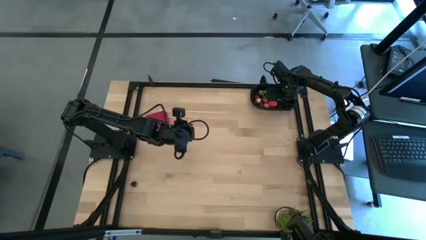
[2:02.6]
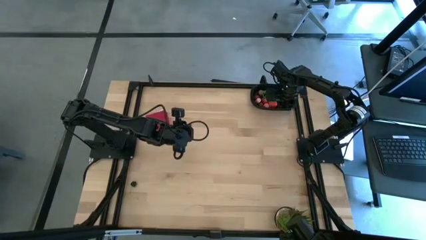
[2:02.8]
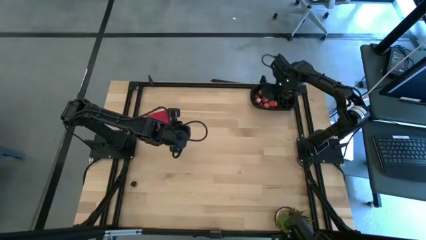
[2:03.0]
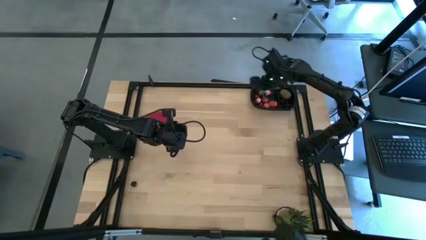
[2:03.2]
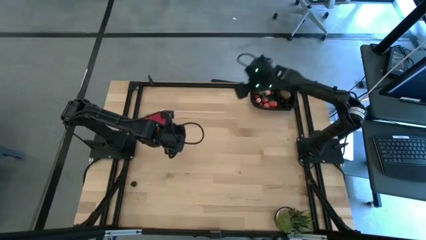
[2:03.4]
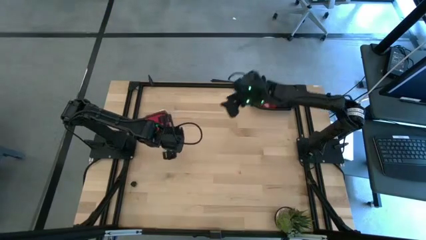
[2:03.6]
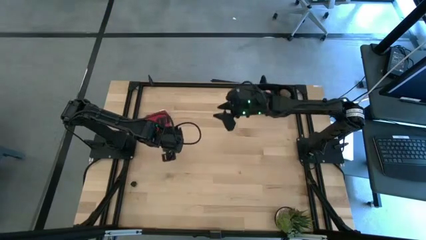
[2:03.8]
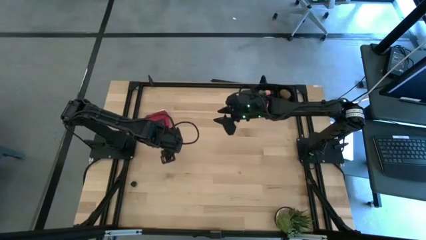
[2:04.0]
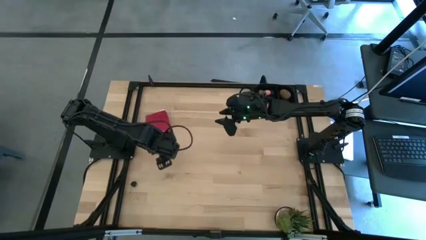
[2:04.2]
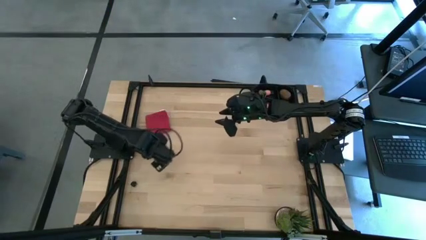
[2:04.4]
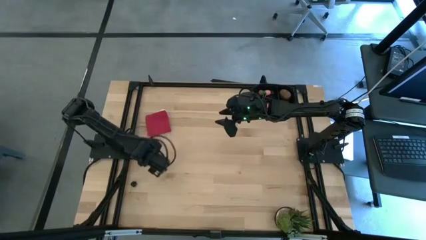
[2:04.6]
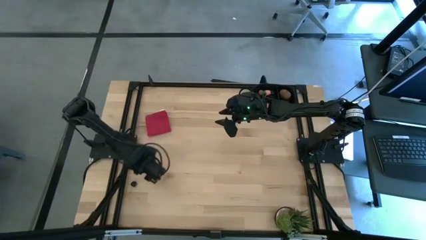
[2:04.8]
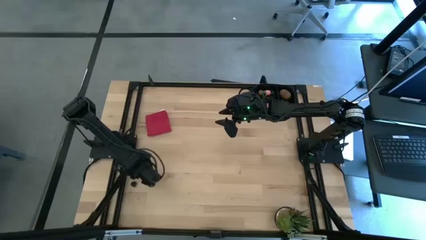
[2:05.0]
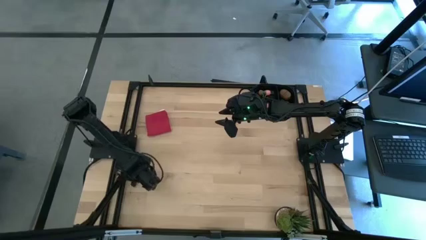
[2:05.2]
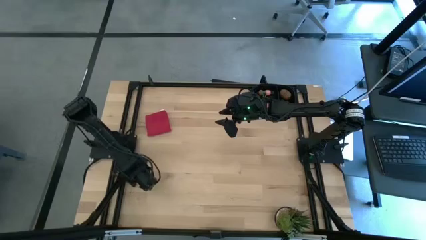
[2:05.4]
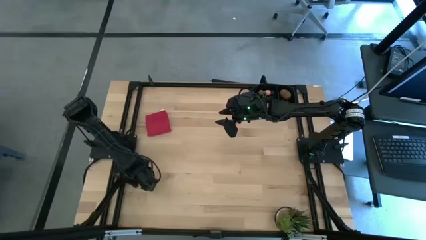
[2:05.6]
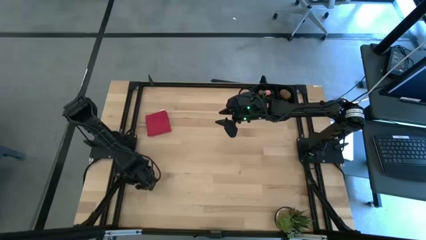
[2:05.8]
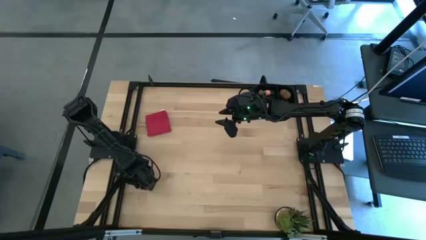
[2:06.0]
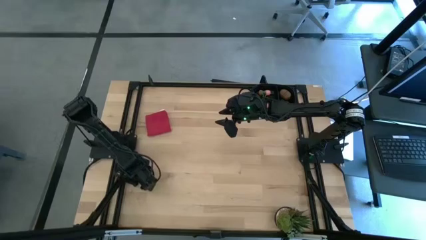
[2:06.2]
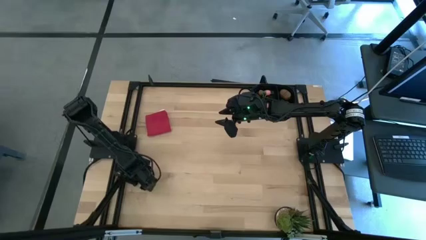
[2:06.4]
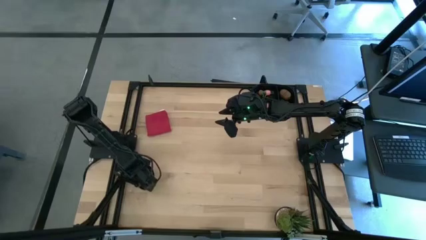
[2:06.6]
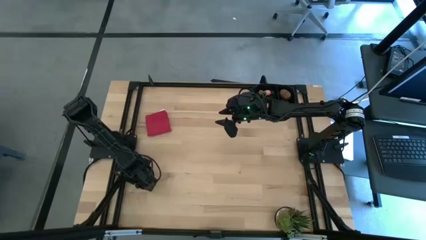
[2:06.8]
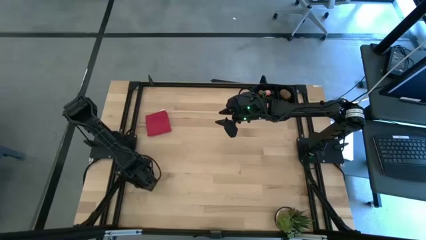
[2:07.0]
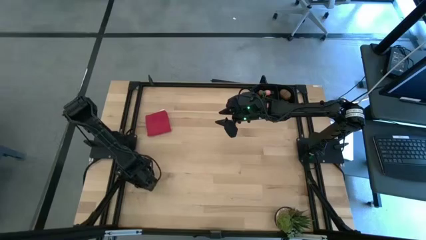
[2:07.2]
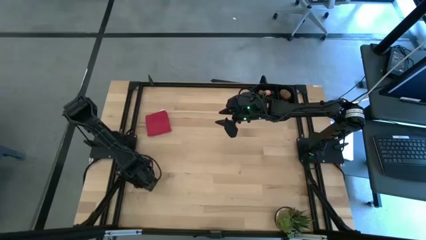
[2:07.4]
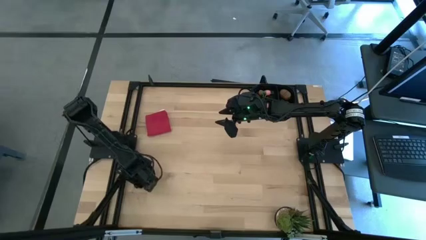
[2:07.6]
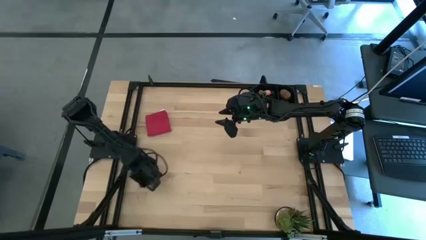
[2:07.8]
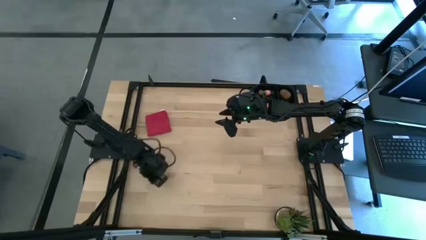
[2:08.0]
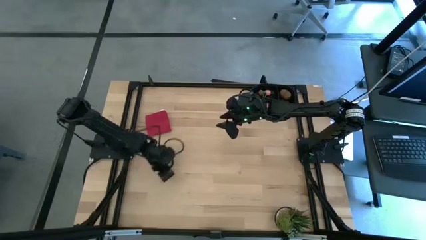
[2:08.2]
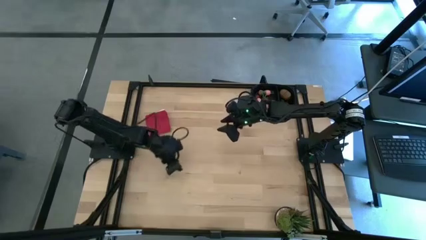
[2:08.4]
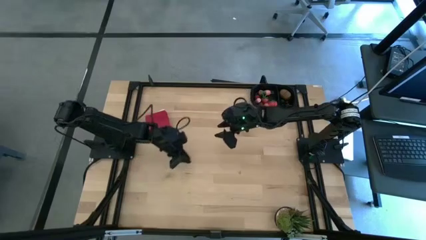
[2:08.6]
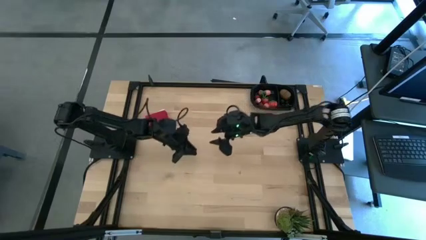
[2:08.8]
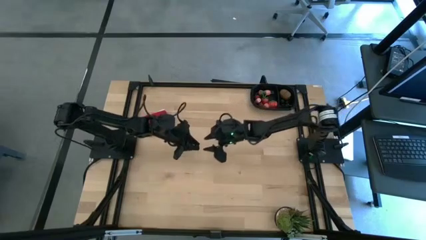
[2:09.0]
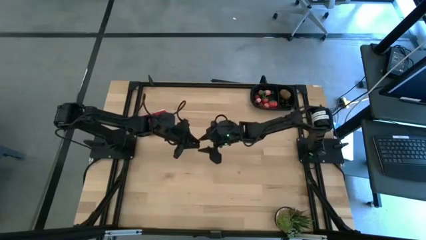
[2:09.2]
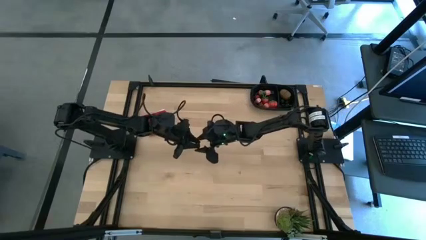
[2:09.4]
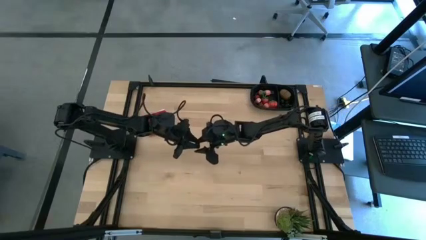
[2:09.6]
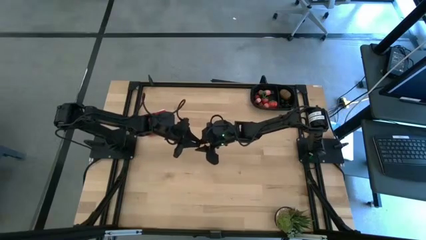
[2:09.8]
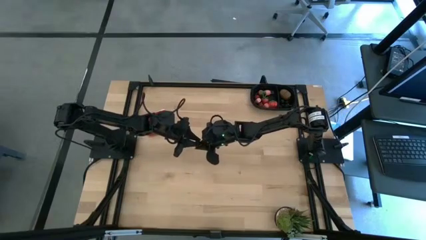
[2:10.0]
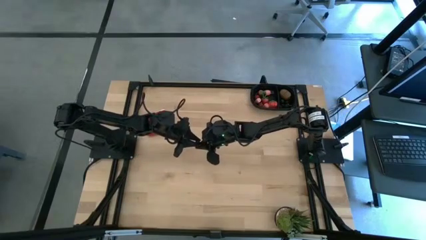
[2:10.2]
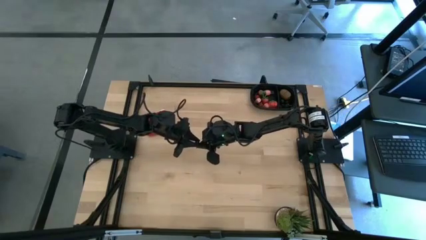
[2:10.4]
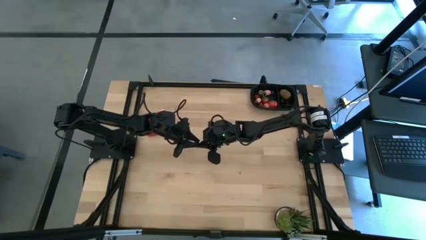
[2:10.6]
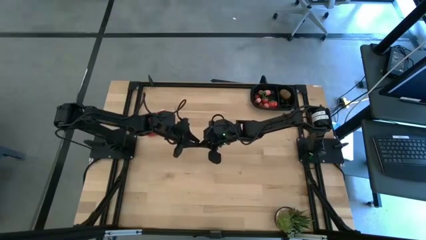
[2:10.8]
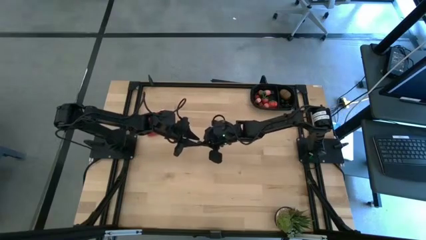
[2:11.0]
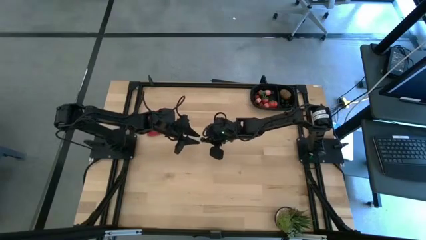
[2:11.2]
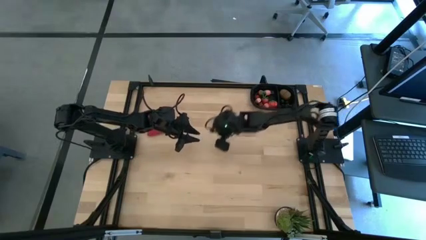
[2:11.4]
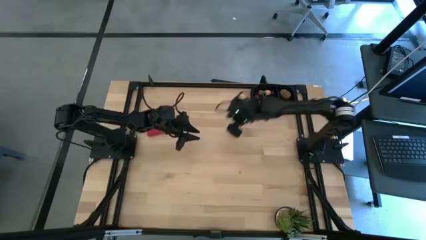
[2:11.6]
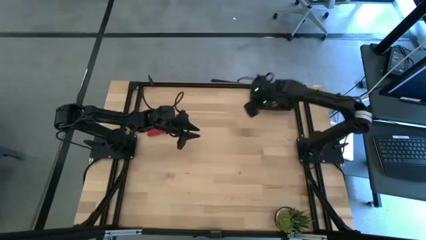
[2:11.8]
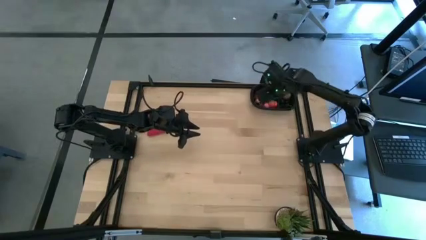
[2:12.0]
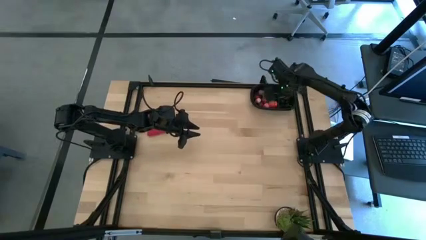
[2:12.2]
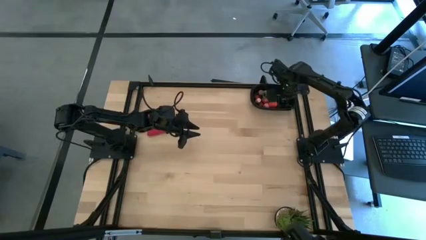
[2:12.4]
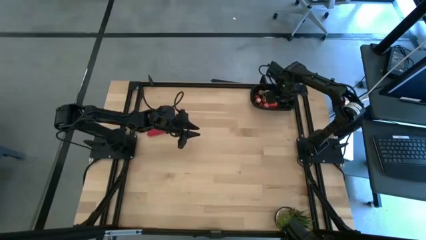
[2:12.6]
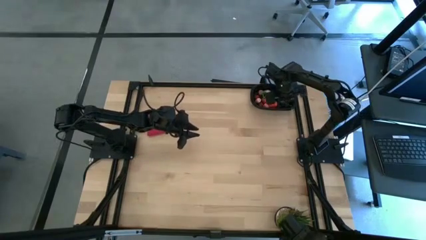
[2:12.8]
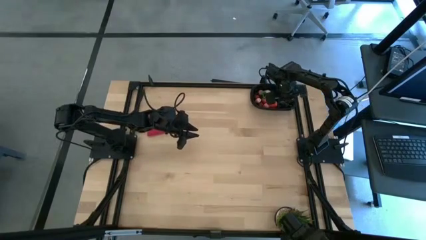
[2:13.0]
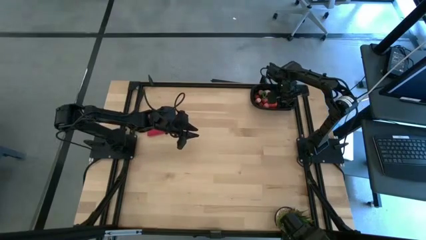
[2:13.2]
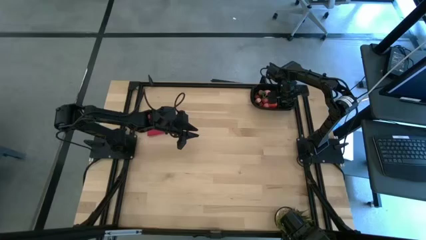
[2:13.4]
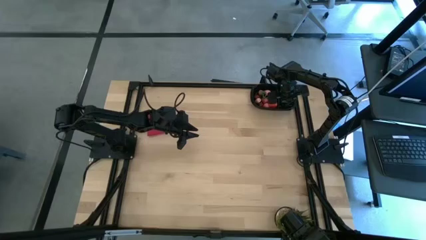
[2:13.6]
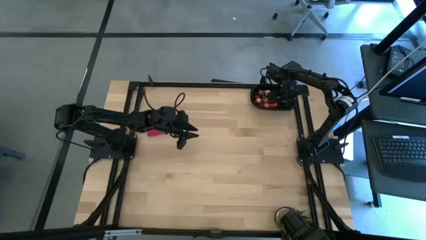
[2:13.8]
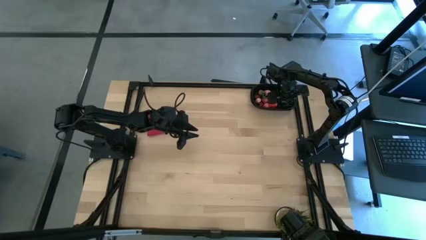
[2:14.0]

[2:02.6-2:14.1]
Task: Pick and placing Produce into tupperware
Put the black cherry into the black bin

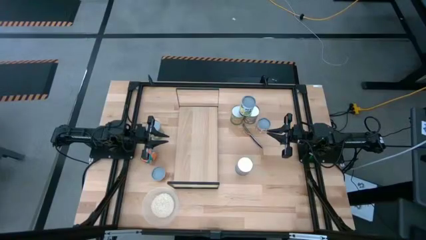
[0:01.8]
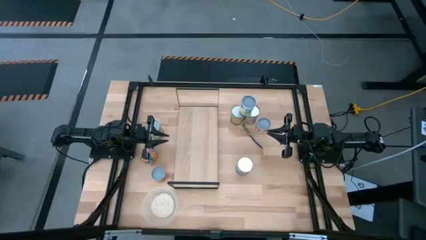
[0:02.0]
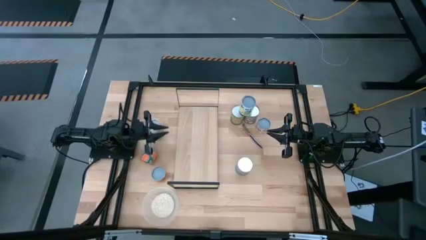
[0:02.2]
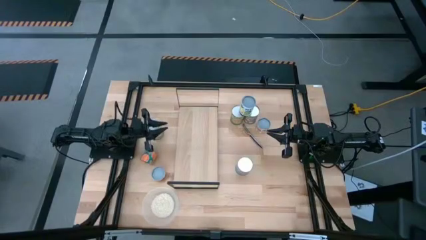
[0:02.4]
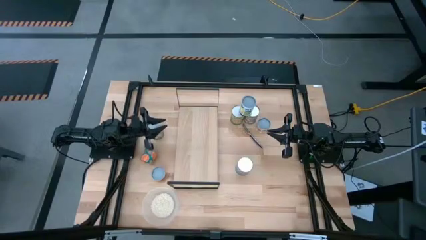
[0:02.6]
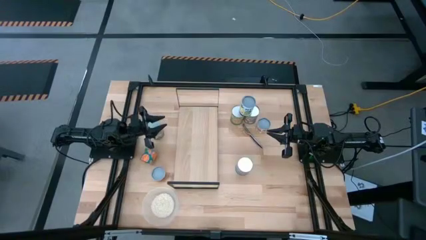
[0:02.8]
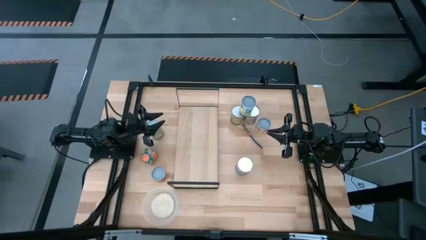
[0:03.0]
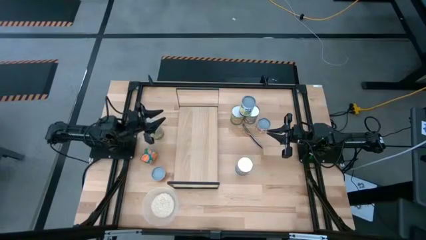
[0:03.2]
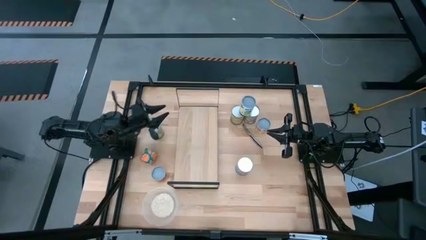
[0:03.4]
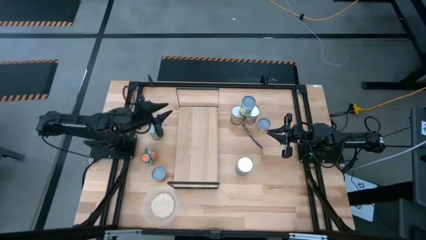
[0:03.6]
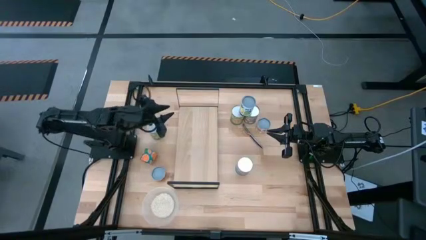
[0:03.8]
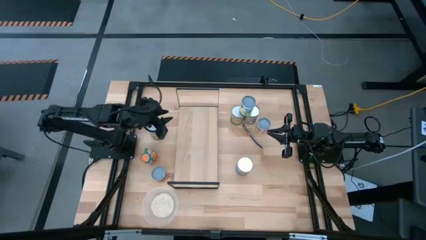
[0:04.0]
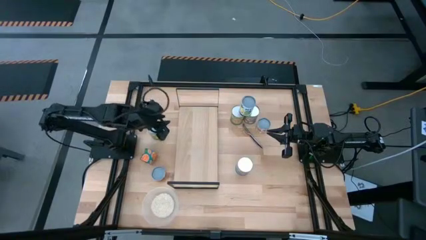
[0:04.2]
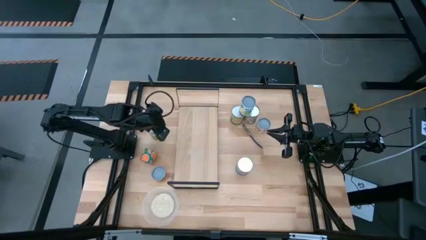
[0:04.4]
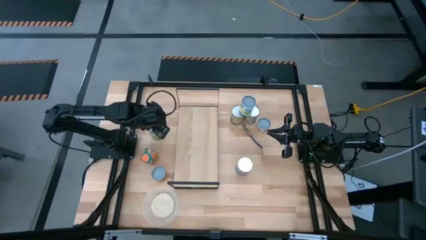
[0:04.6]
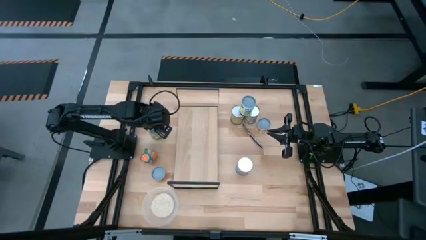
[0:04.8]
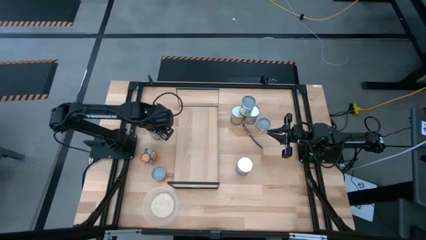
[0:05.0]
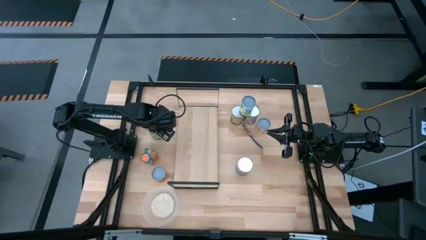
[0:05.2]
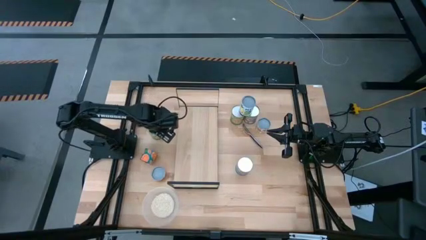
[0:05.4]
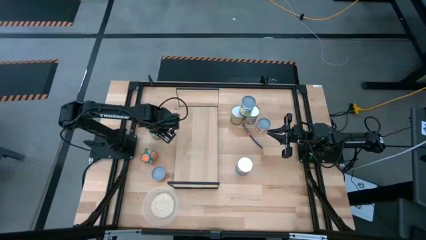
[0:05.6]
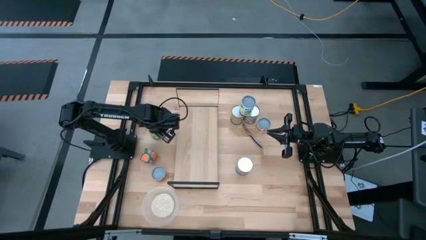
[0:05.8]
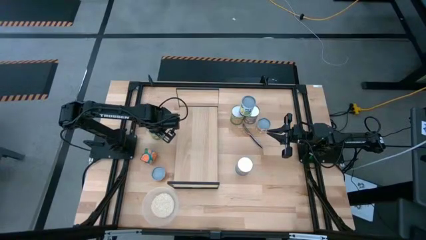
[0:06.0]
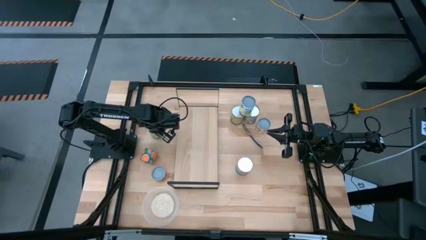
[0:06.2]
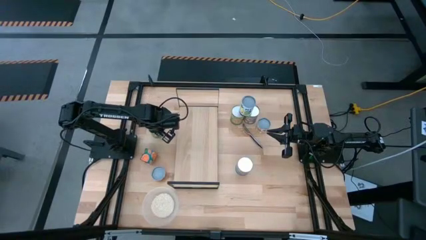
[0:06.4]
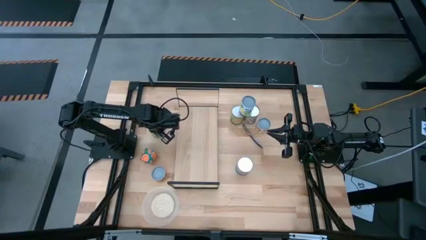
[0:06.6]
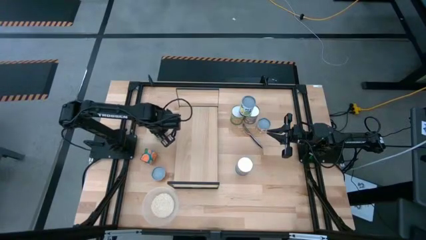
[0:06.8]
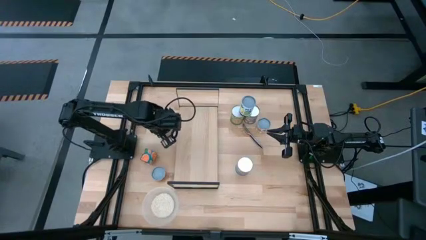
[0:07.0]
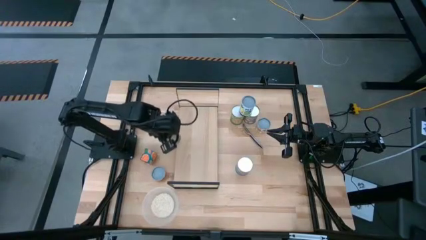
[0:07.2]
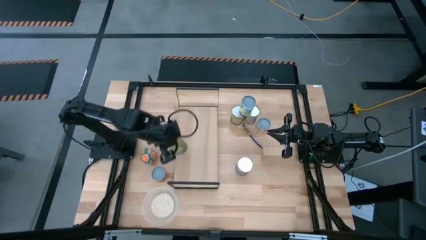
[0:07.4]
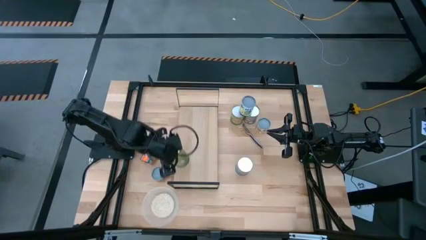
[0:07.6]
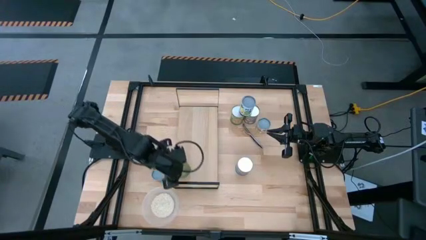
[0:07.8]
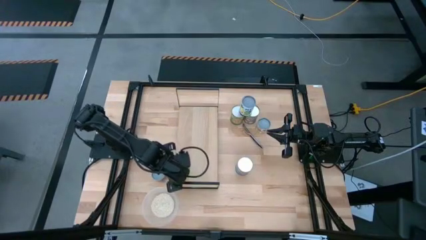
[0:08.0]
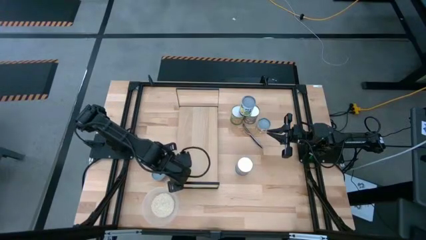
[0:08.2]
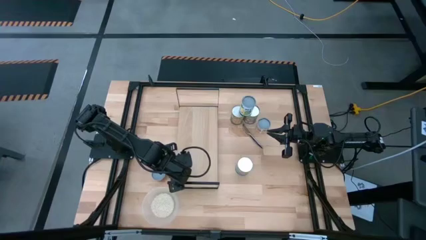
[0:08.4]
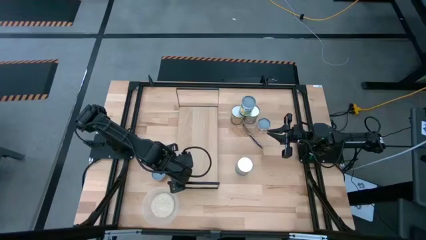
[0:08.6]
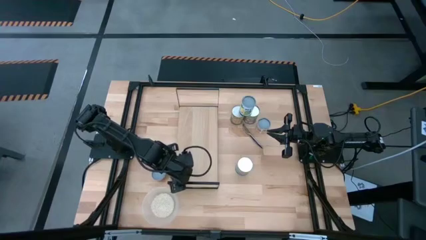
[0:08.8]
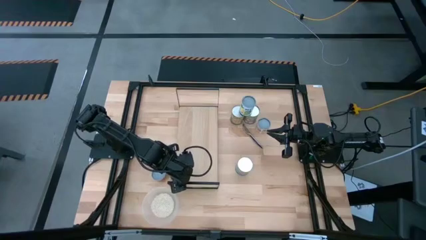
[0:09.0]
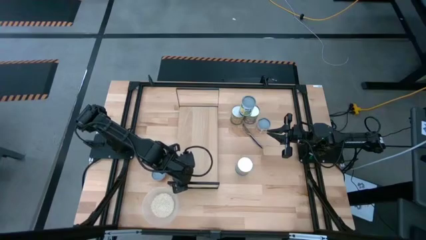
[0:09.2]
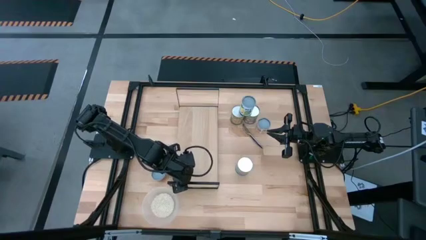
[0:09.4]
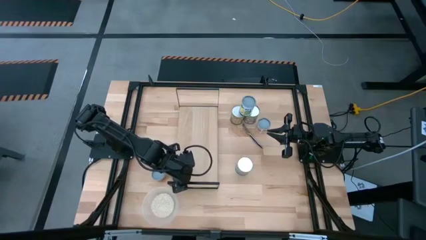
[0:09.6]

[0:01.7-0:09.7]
Task: Pick and place cans onto a shelf
Put the canned pears on the shelf
